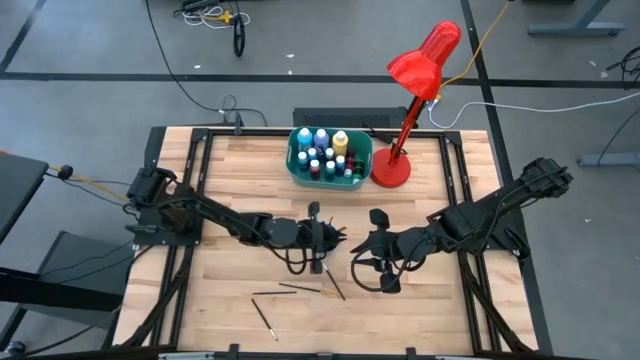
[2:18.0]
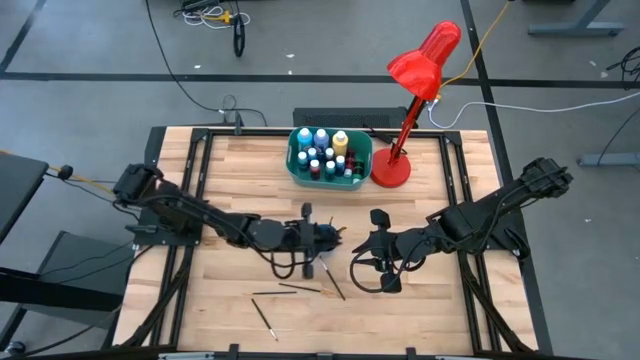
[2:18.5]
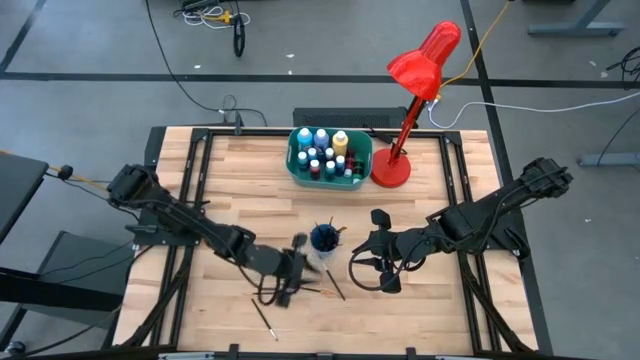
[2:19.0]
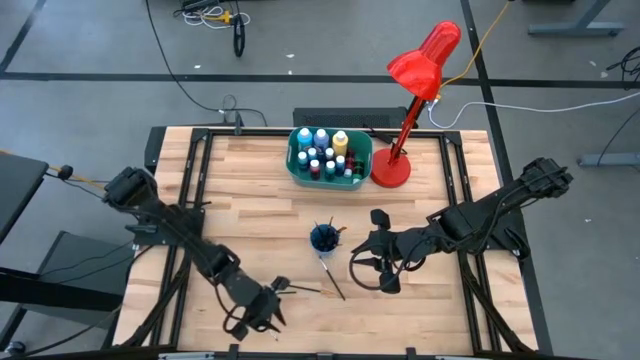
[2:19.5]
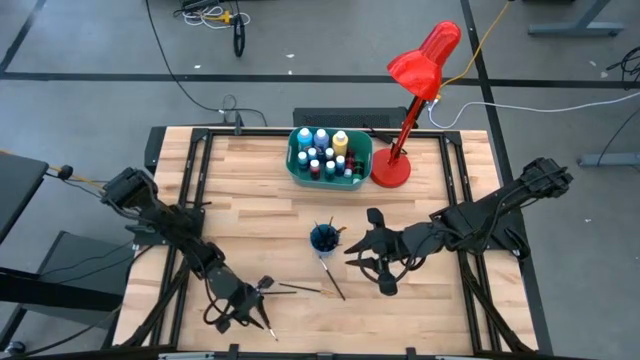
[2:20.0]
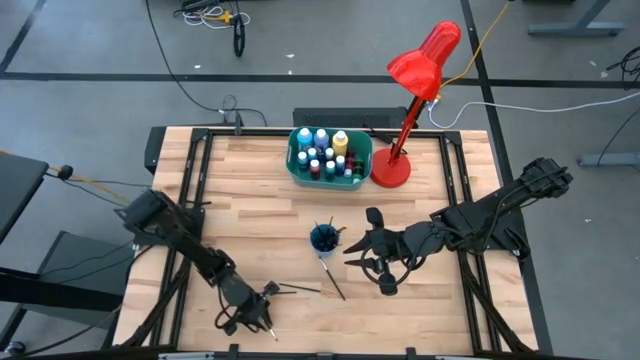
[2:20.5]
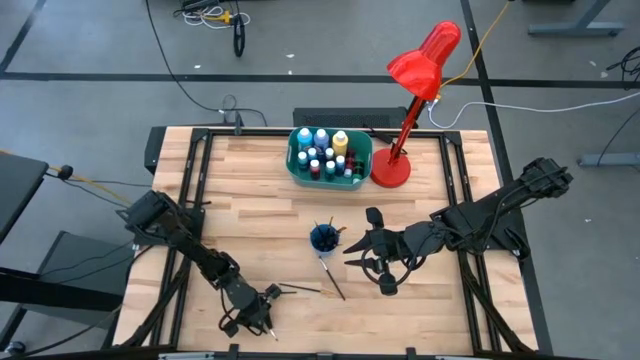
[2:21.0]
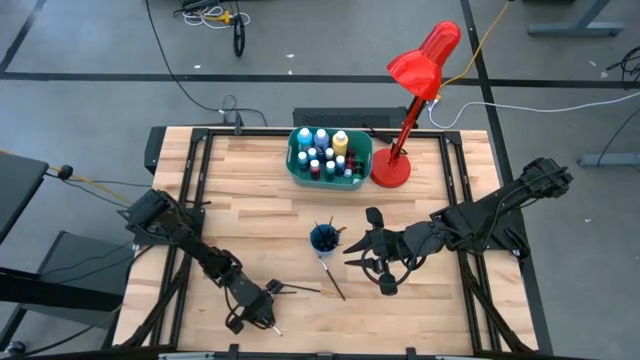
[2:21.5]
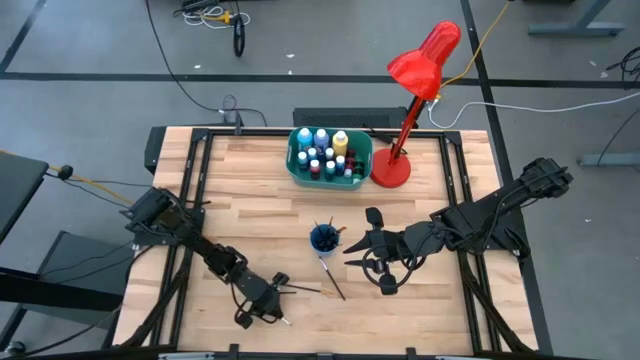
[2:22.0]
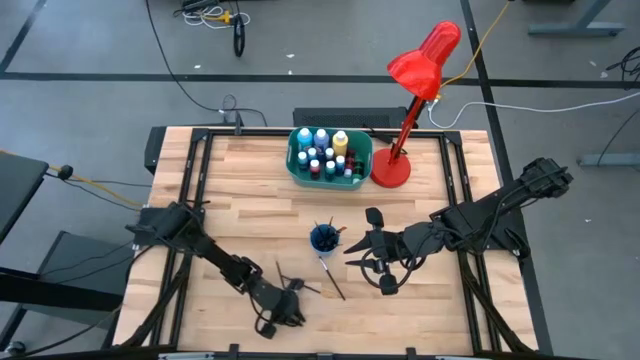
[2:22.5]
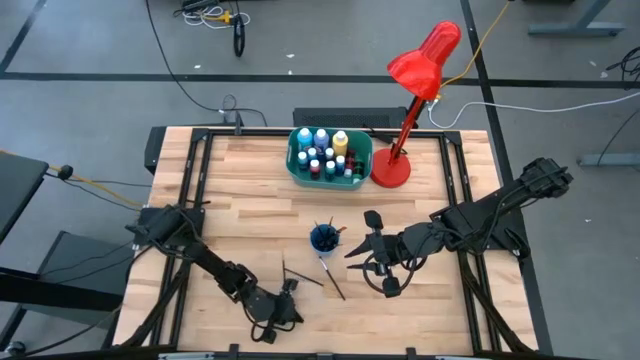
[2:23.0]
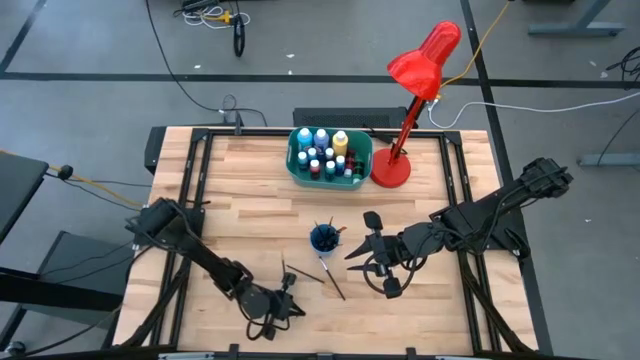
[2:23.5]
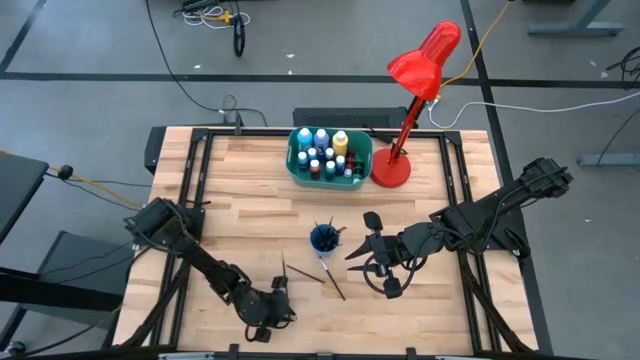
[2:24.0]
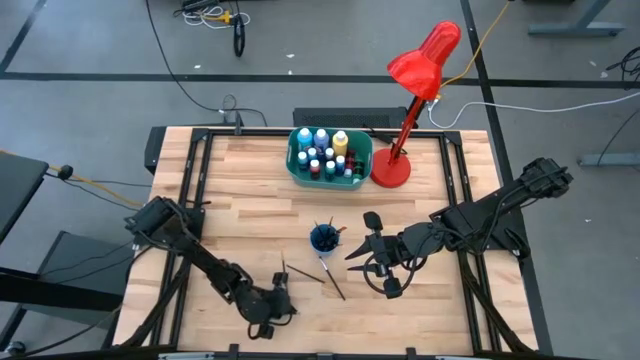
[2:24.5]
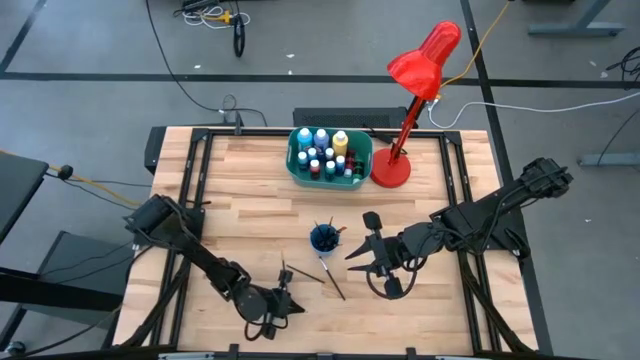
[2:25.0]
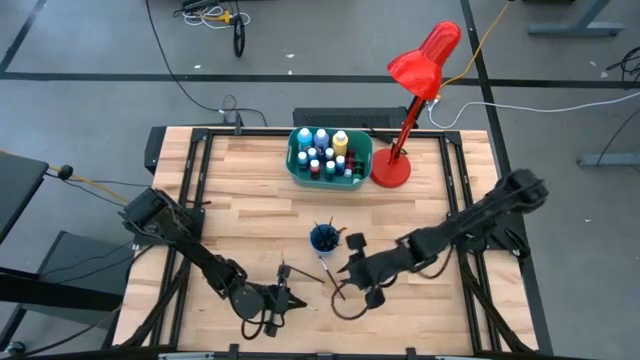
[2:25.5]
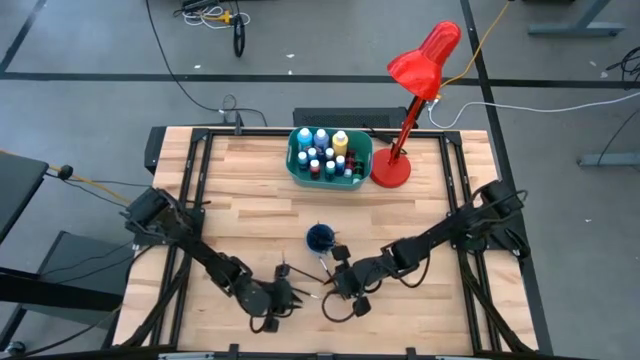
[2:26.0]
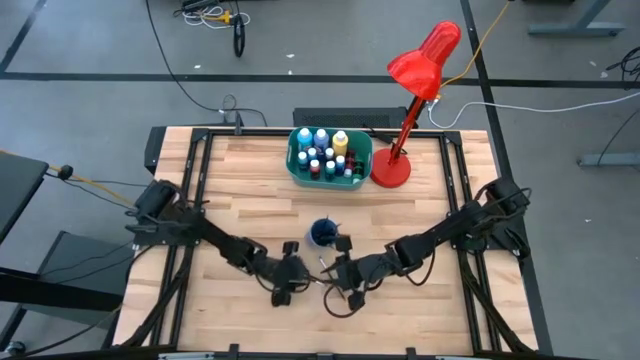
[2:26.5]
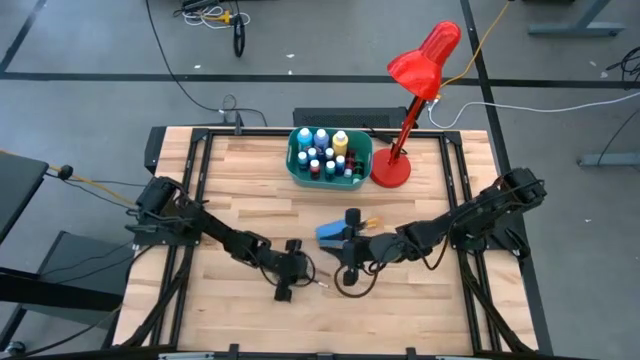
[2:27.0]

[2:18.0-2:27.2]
Task: Pick & Place Paint Supplies
Put the silver paint brush into the blue cup

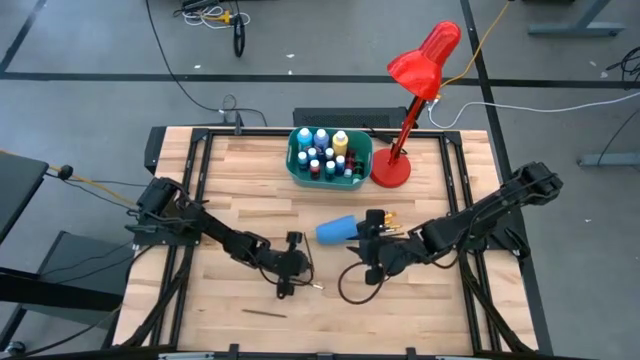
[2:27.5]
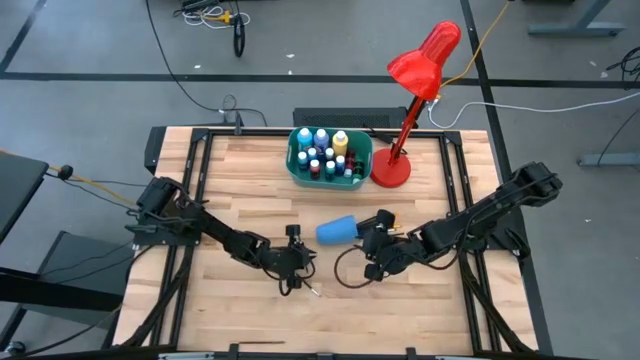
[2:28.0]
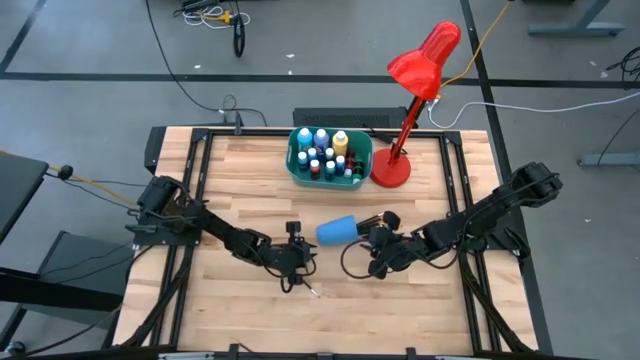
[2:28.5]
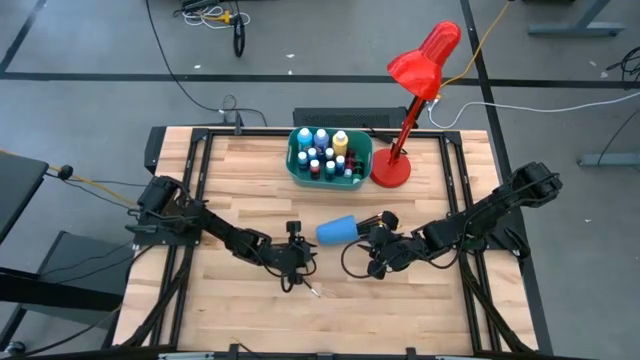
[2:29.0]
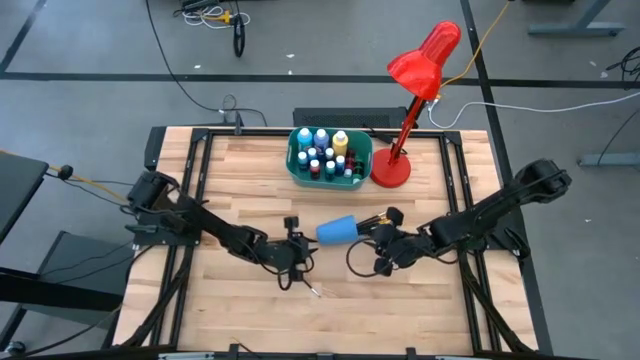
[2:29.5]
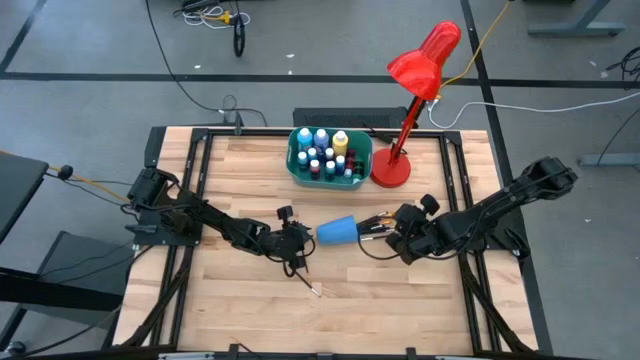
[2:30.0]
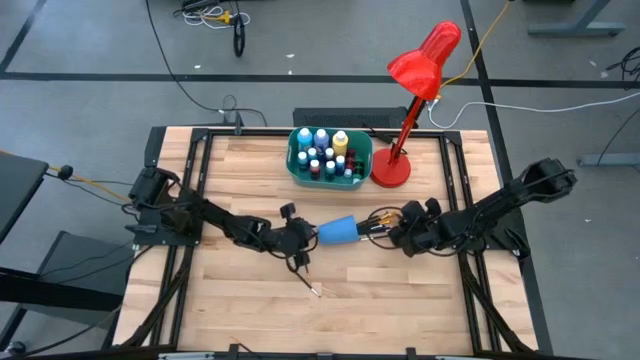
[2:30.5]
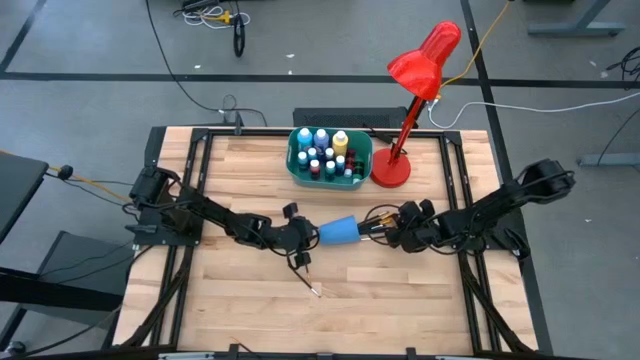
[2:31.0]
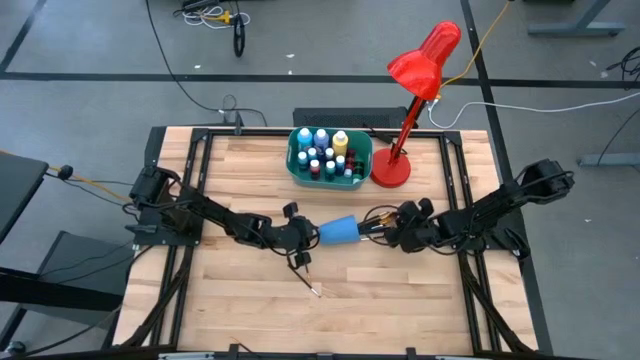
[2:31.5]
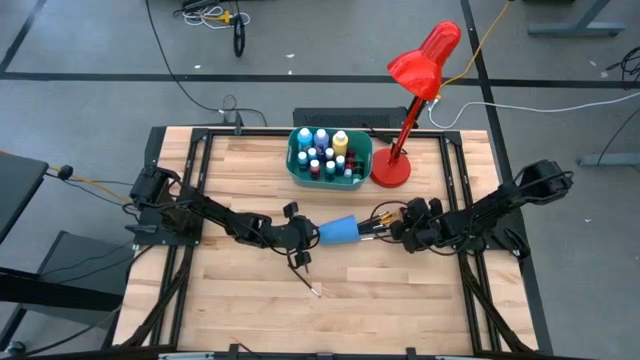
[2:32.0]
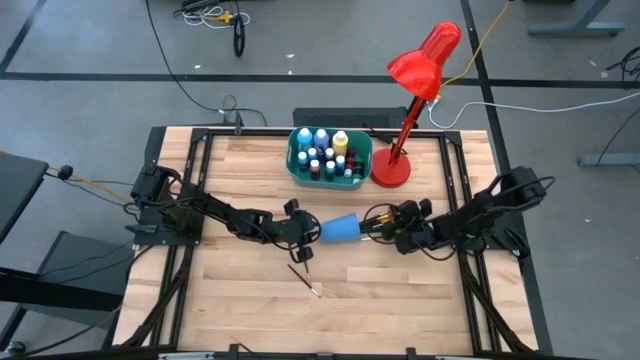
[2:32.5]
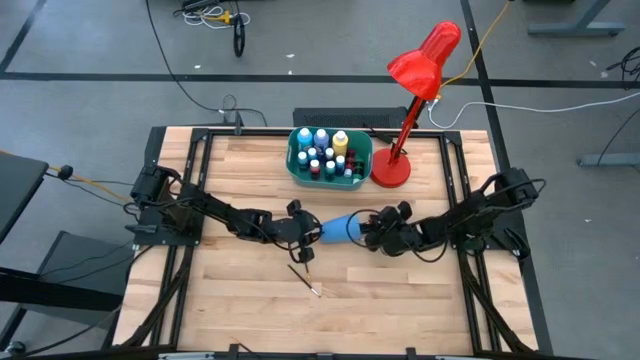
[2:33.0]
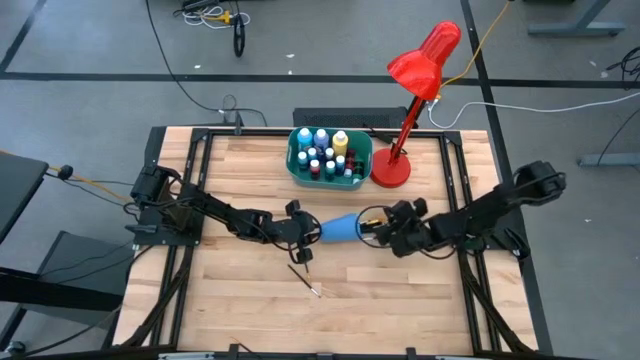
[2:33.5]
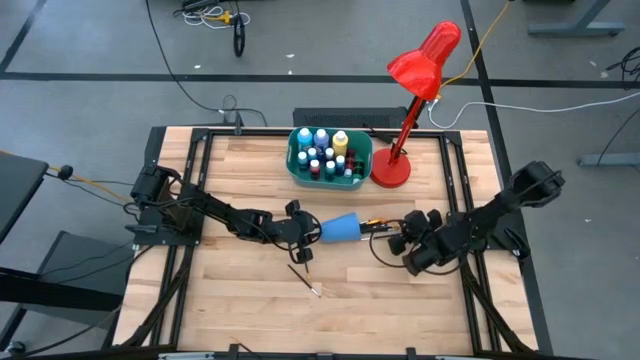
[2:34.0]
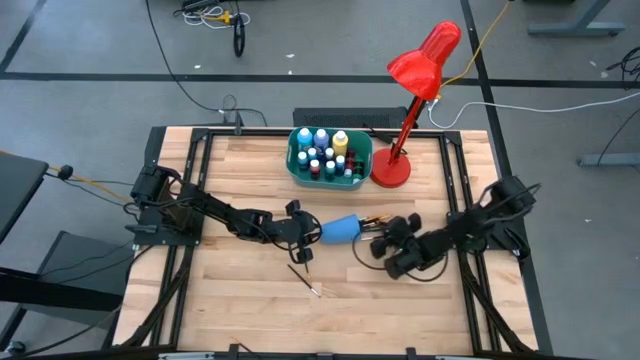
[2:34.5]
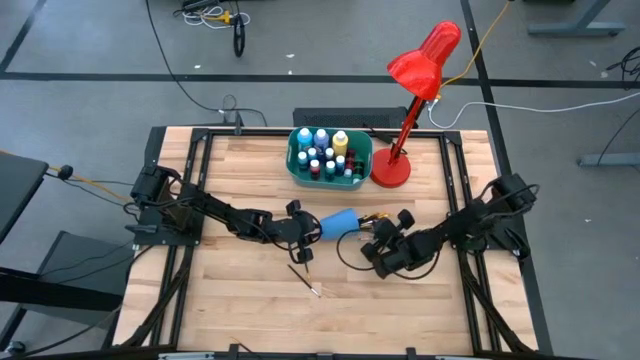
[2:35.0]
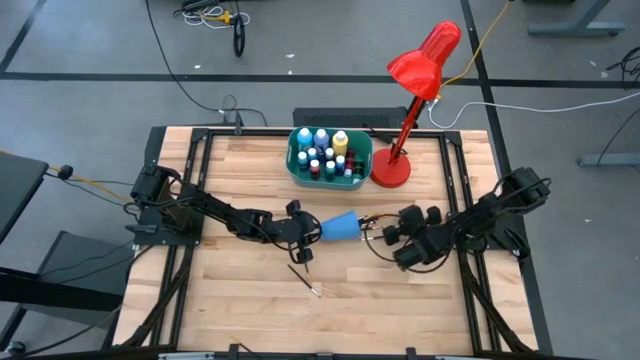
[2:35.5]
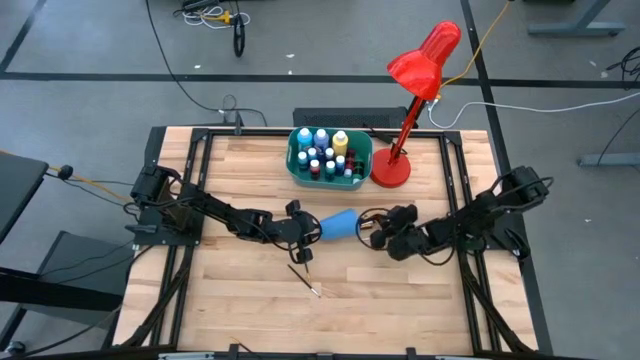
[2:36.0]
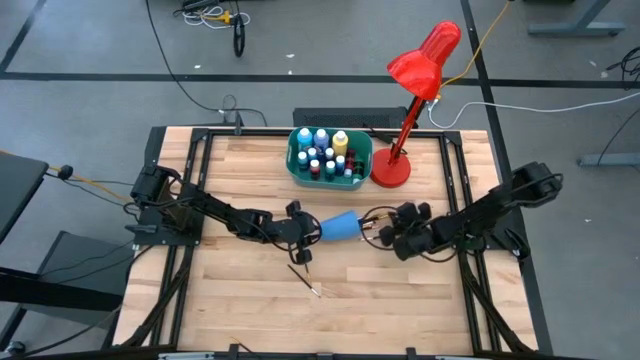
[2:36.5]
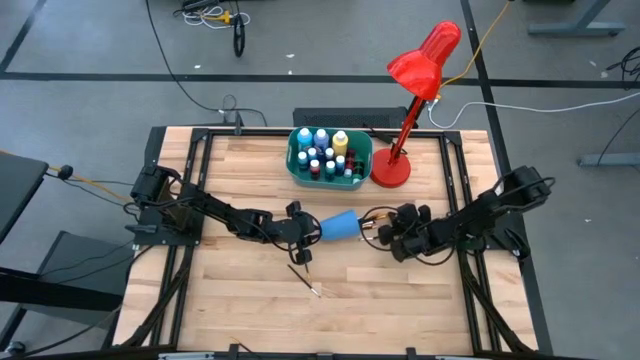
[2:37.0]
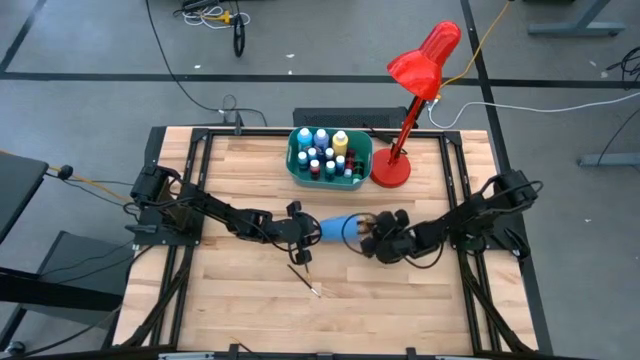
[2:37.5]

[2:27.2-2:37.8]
Adjust the paint brushes in the blue cup
